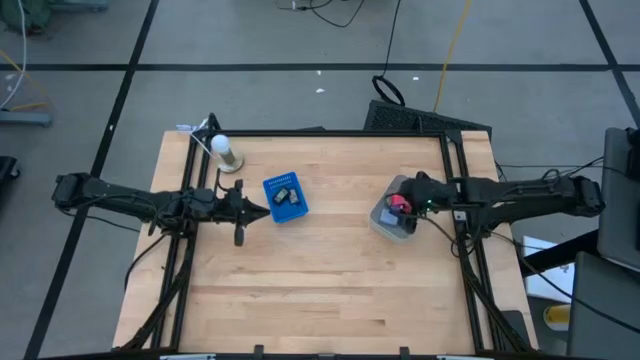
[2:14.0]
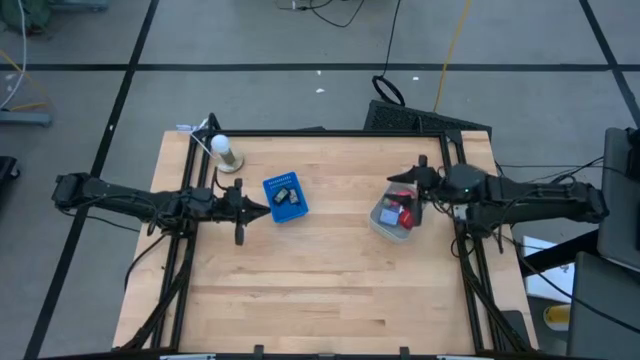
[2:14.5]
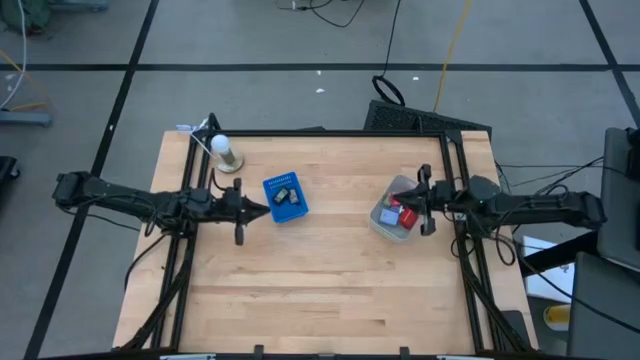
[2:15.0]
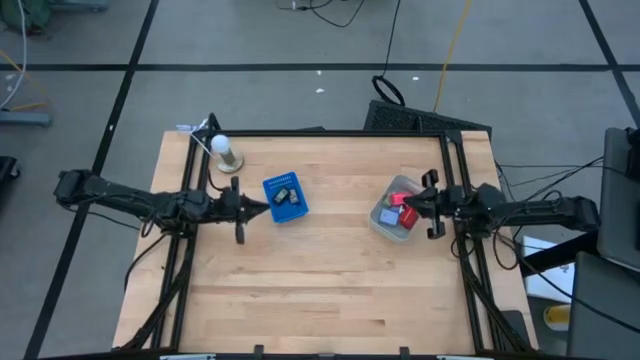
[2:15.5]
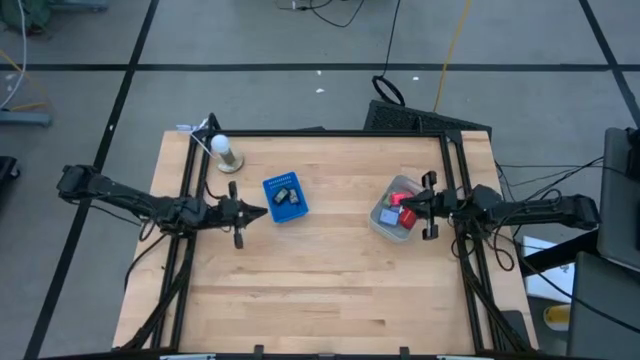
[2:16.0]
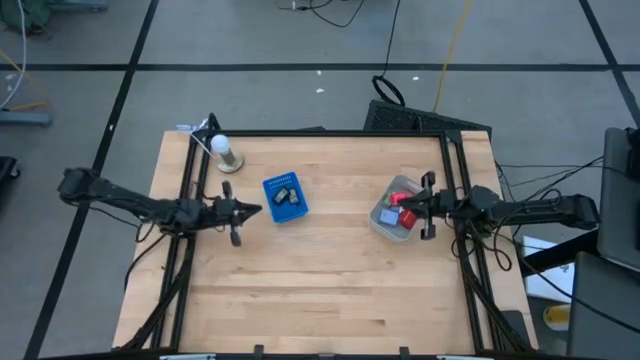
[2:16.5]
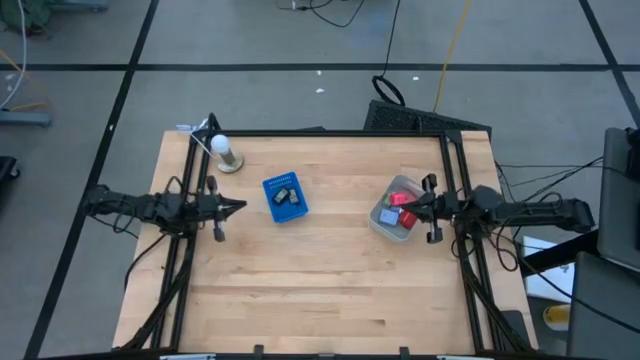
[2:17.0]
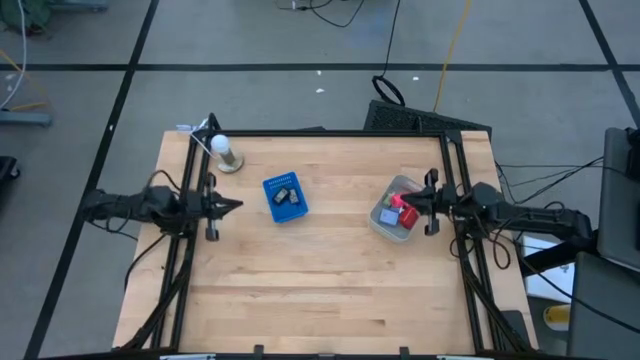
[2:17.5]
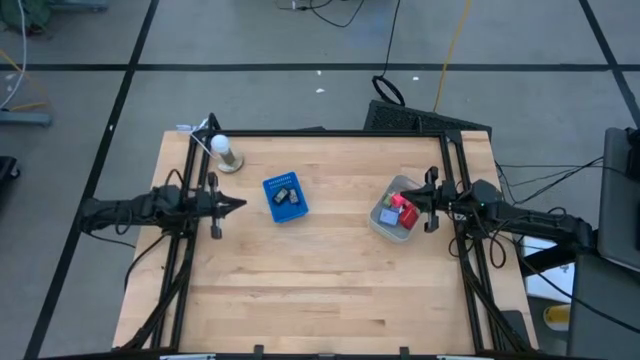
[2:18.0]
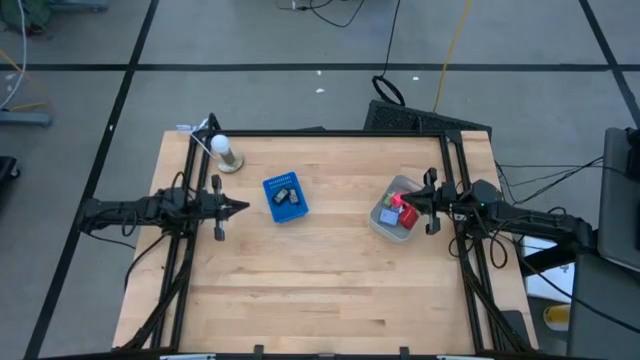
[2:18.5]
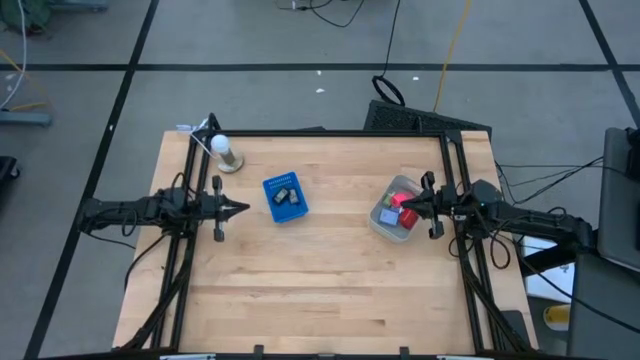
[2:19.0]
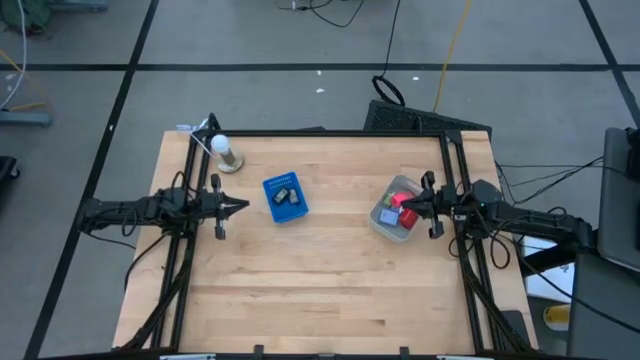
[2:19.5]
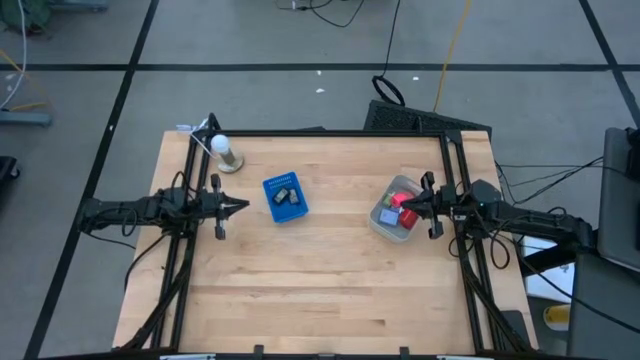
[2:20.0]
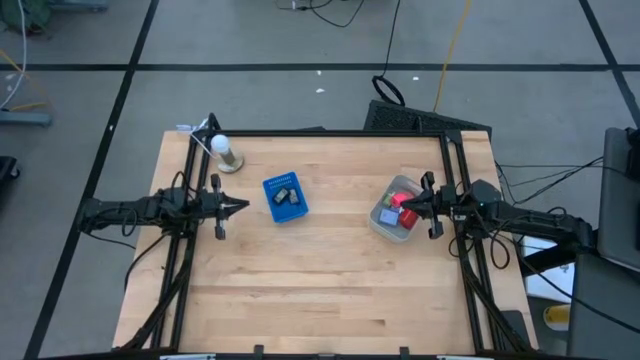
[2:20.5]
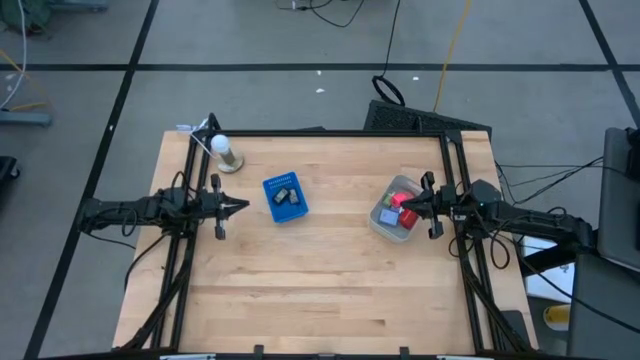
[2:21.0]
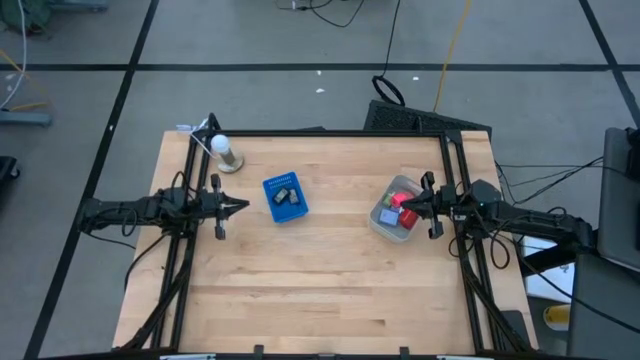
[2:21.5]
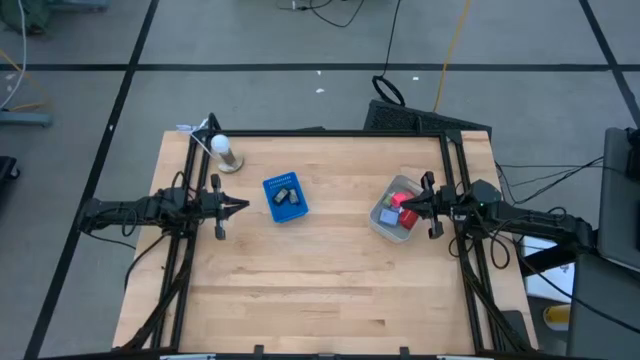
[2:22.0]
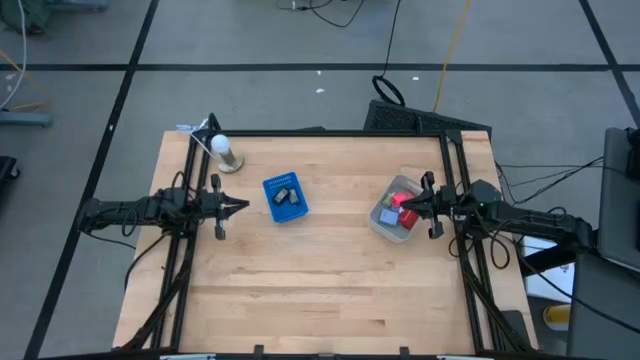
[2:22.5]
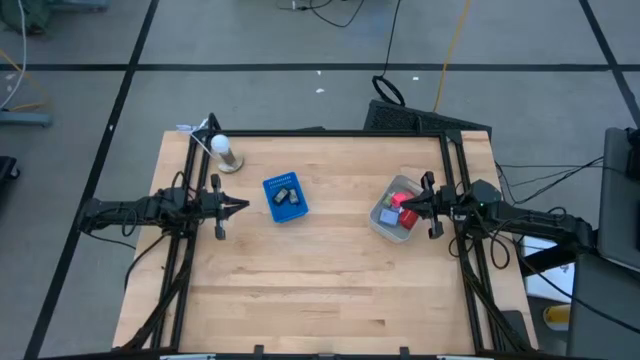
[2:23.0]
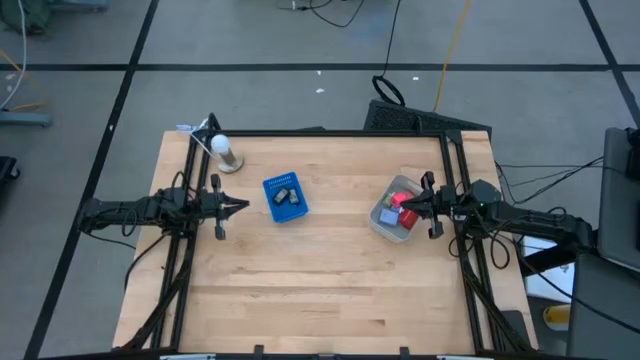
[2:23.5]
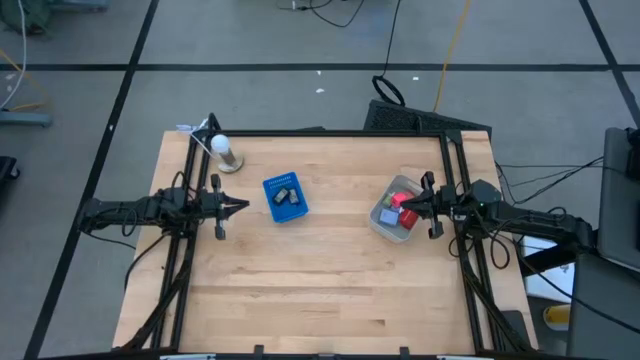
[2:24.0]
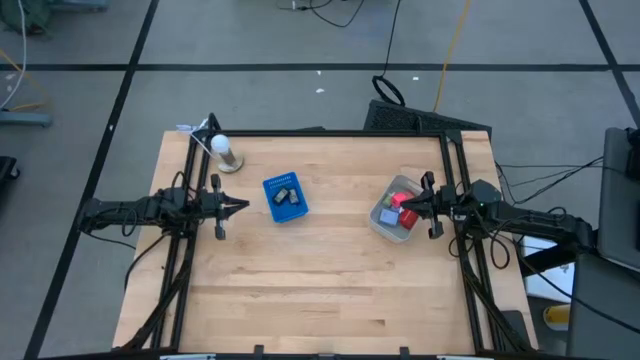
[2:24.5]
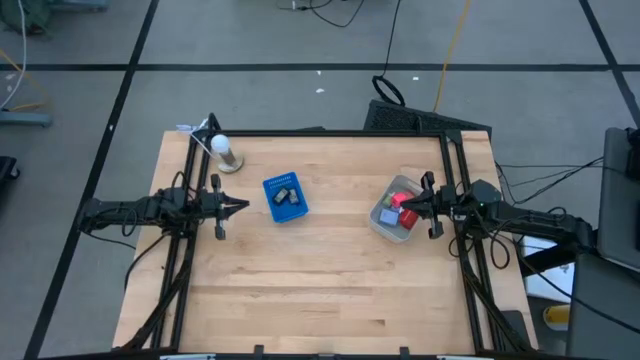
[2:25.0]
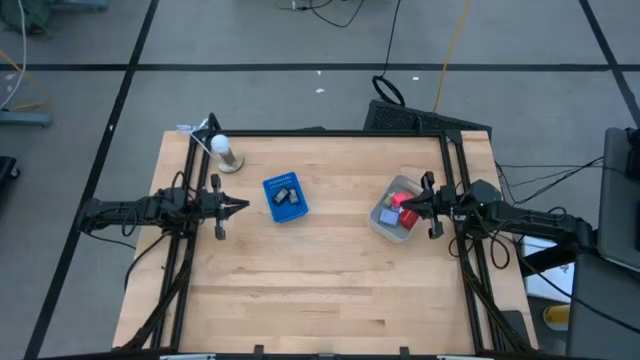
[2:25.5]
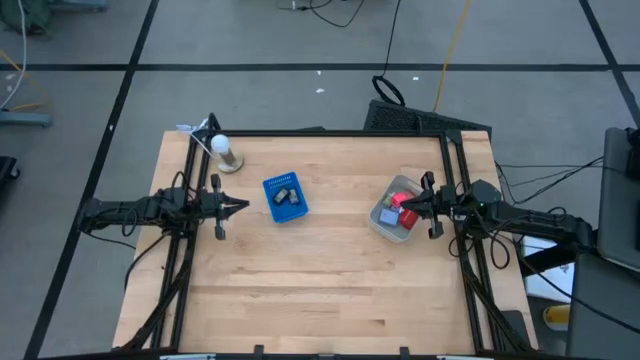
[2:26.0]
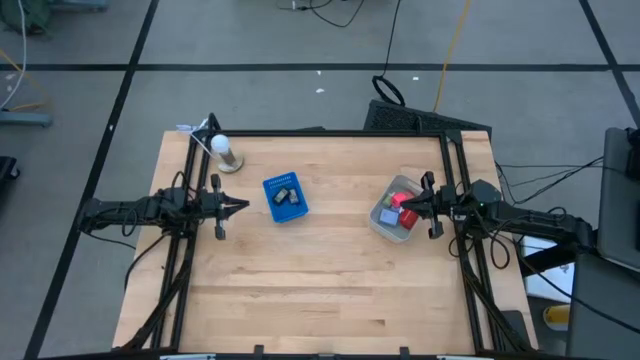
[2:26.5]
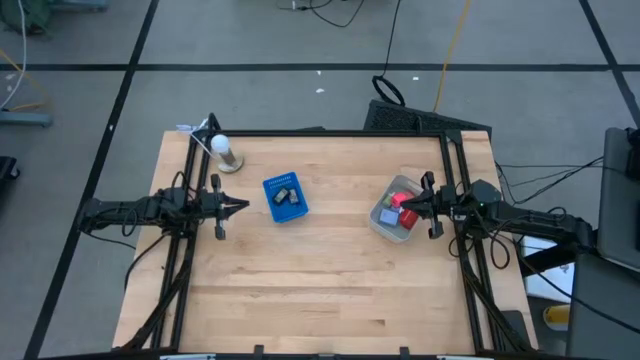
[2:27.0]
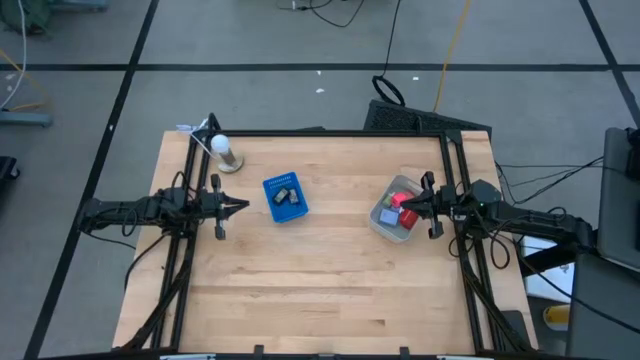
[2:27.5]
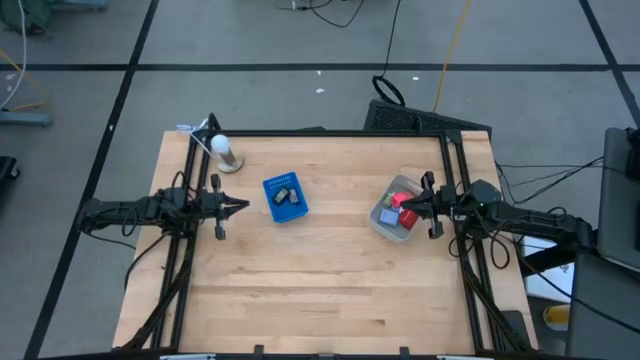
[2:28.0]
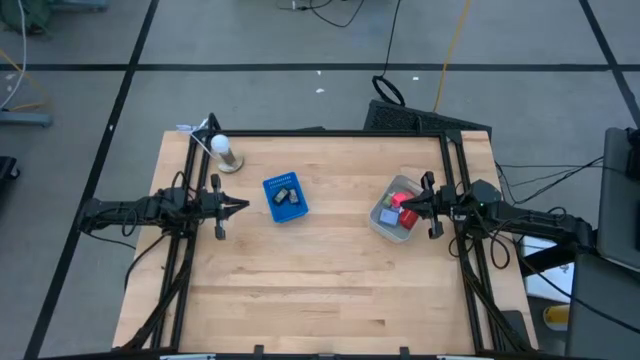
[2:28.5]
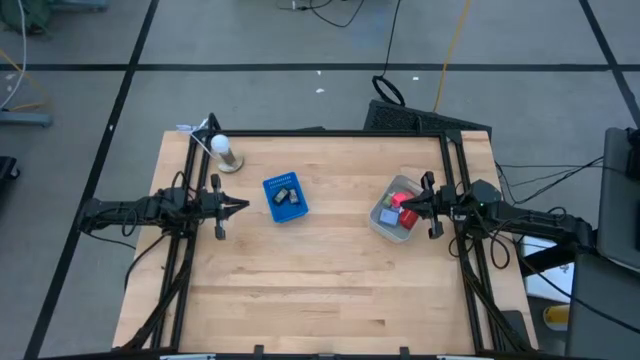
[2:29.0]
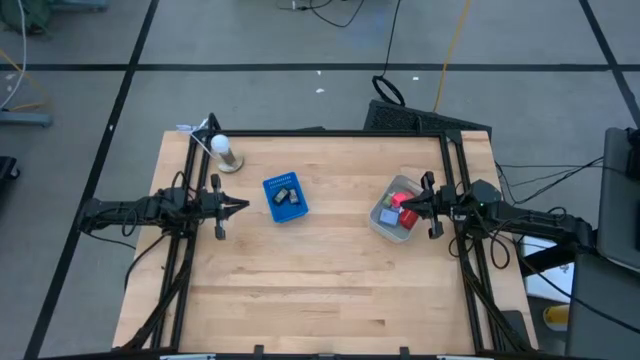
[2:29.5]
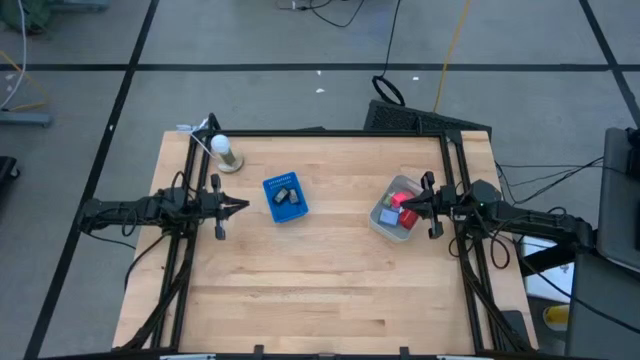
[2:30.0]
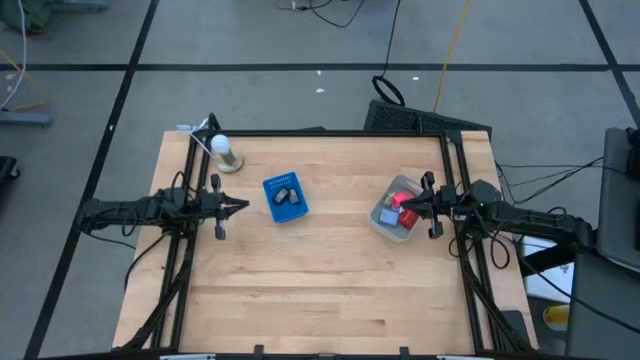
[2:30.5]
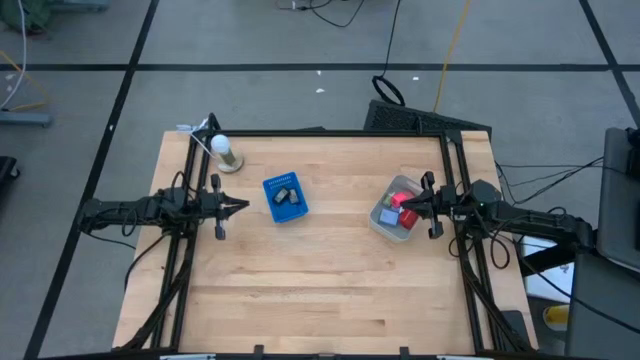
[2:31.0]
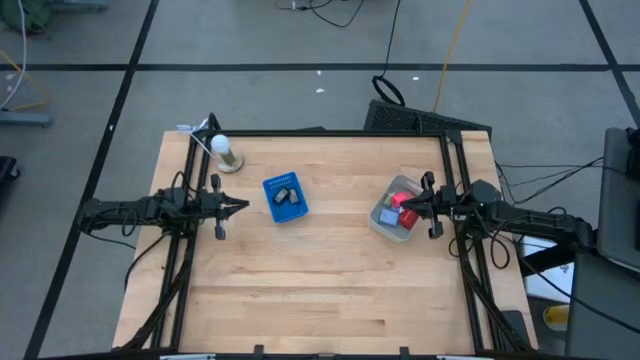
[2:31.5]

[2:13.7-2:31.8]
Task: Pick & Place Office items
Return to Home Position

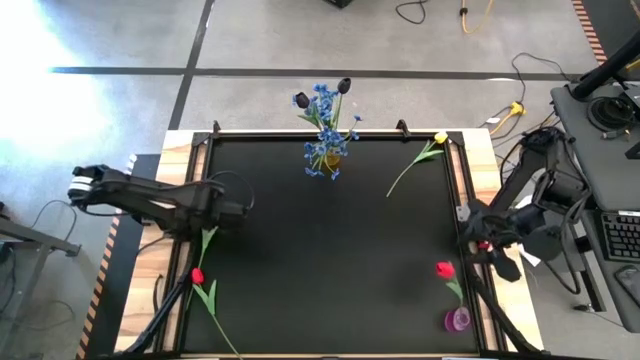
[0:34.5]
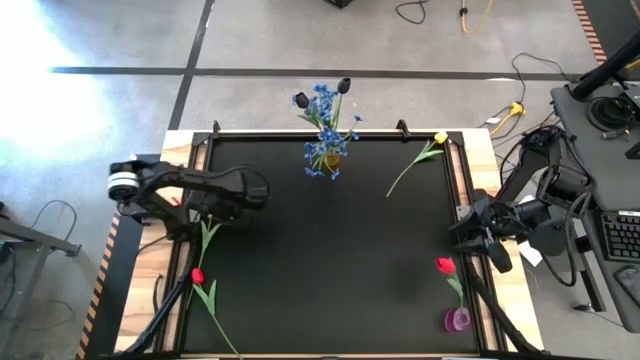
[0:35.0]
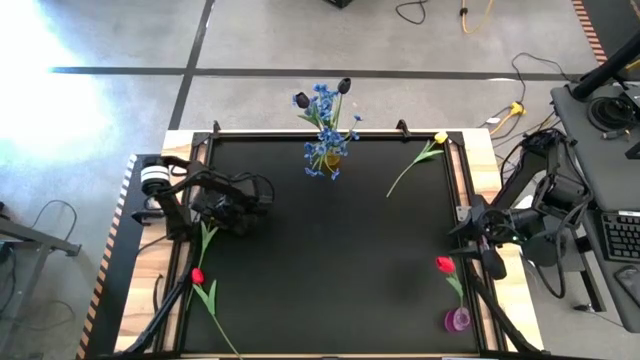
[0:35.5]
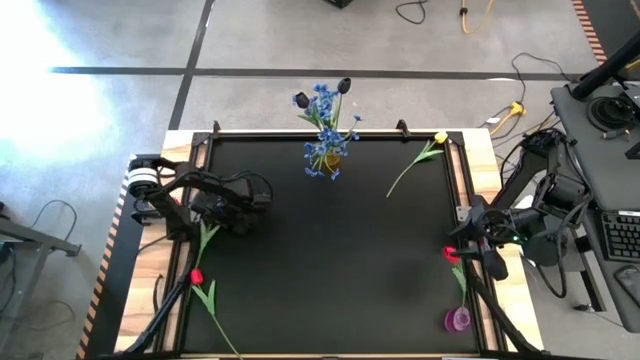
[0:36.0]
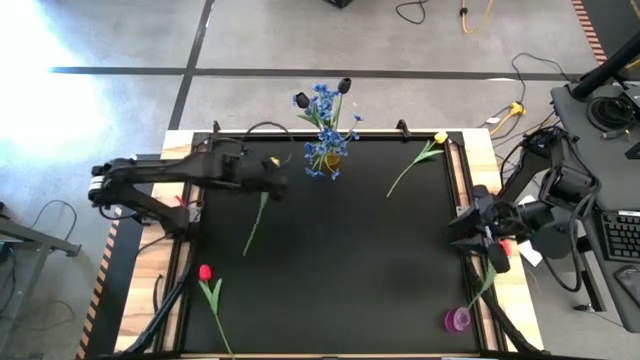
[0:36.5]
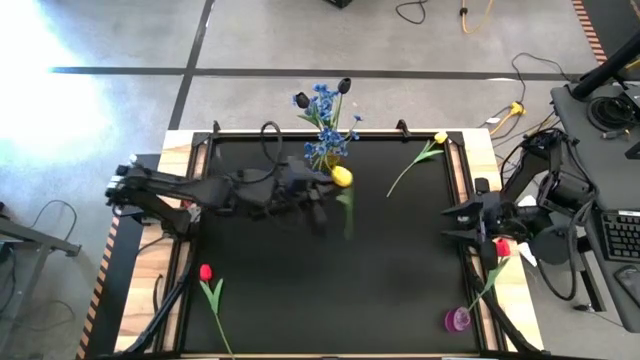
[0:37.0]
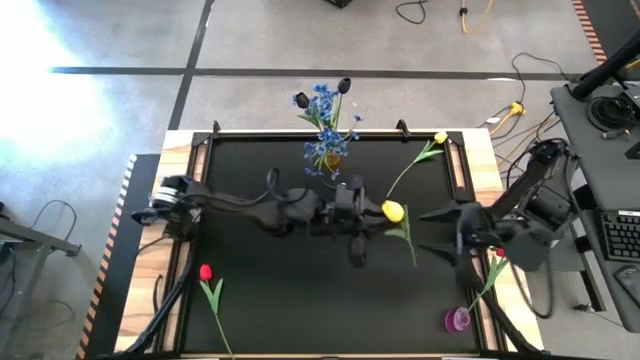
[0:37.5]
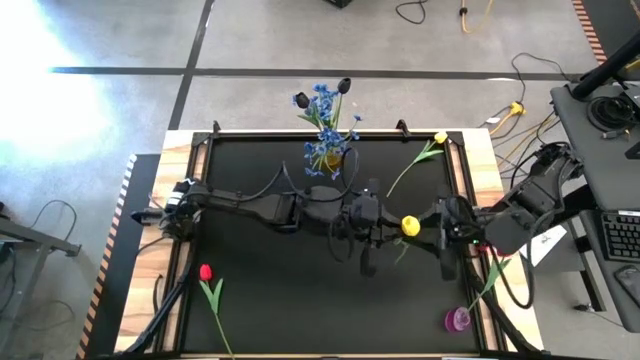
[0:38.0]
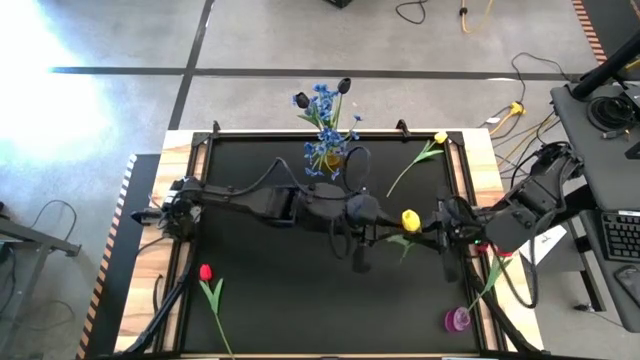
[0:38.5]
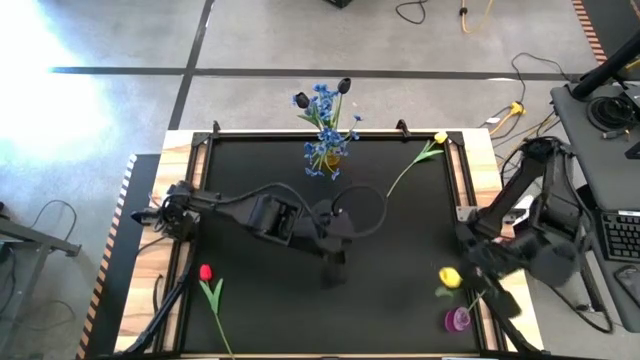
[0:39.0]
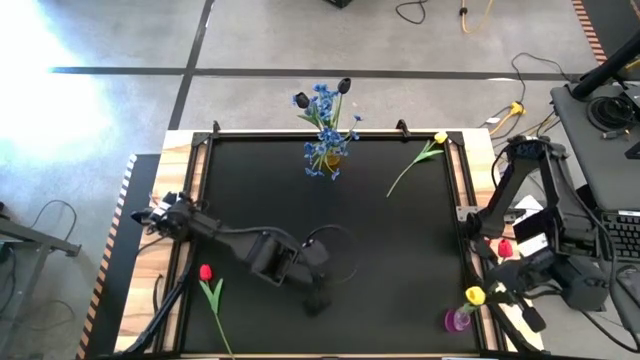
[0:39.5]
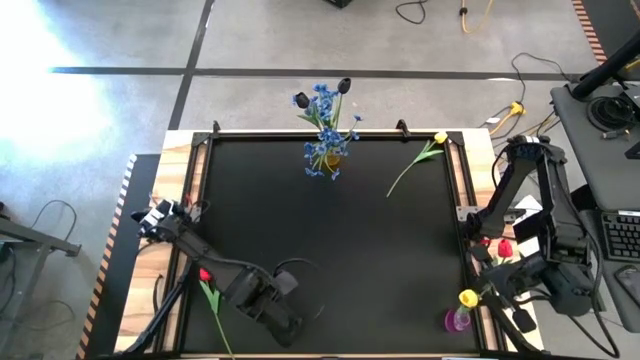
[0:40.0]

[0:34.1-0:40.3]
Task: Sort flowers into vase by color
Put the bottom yellow tulip into the purple vase
